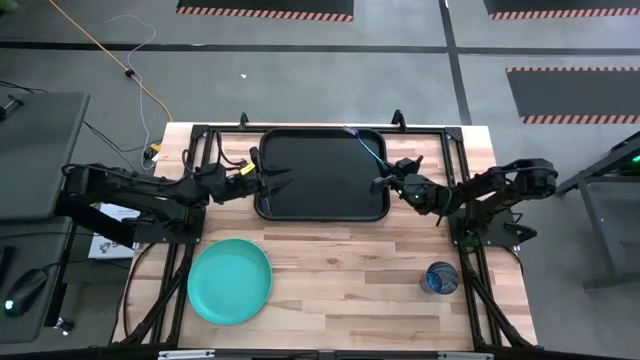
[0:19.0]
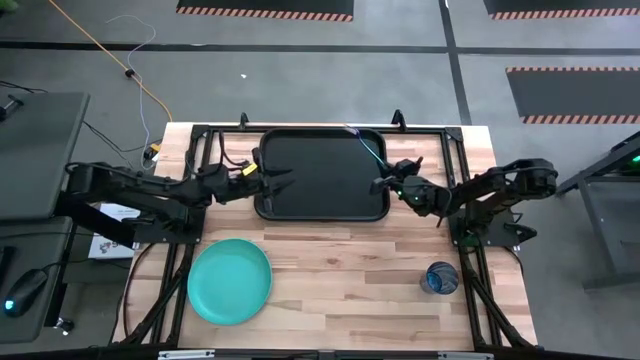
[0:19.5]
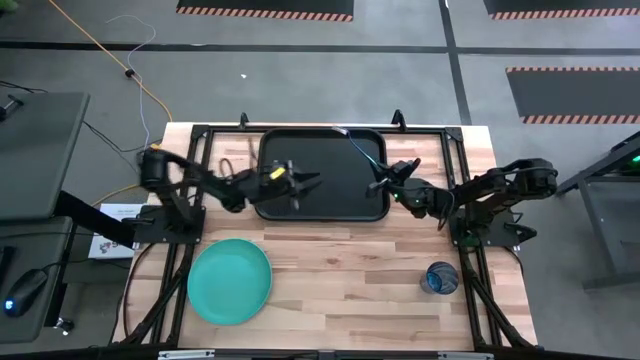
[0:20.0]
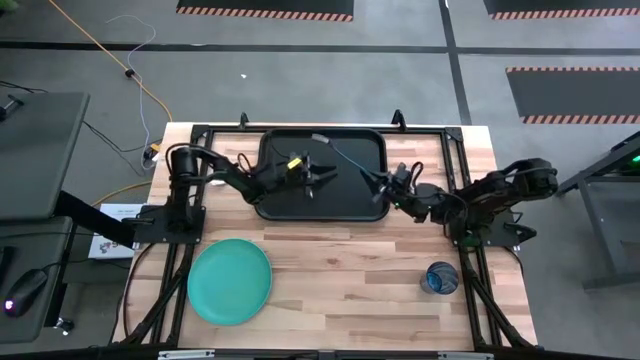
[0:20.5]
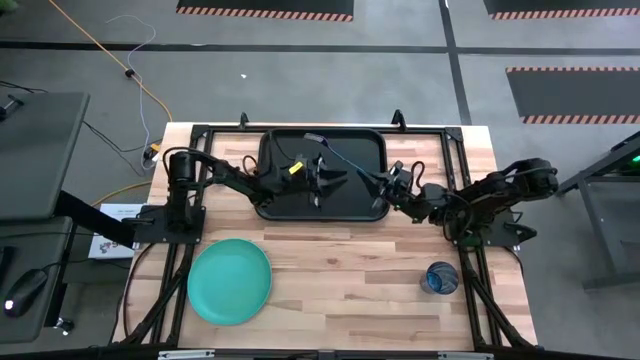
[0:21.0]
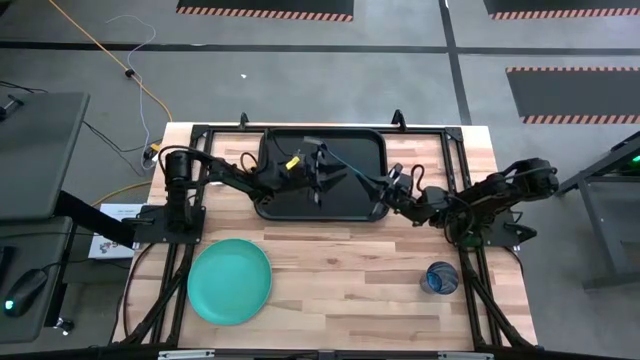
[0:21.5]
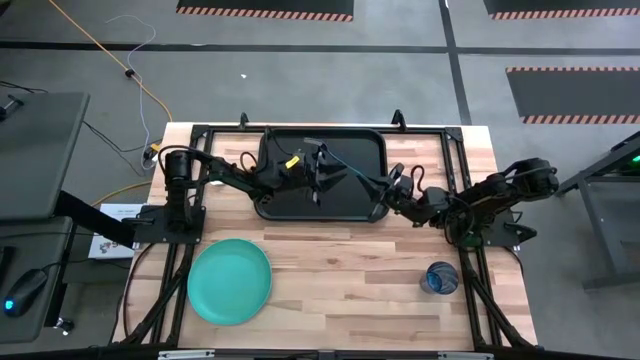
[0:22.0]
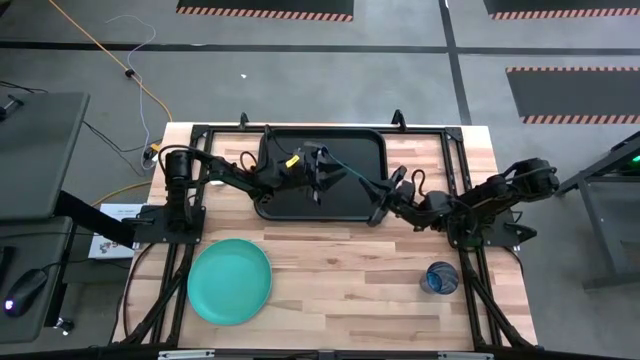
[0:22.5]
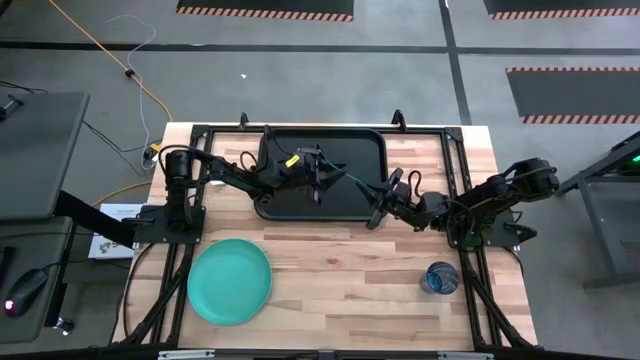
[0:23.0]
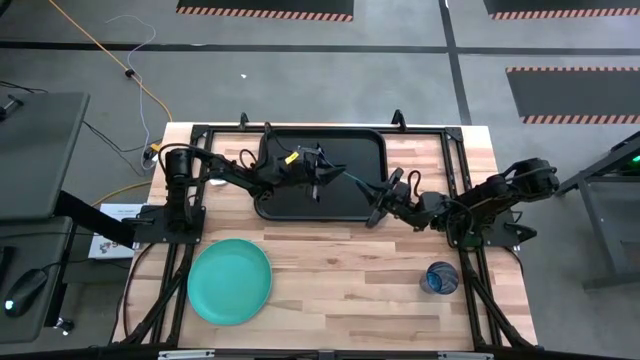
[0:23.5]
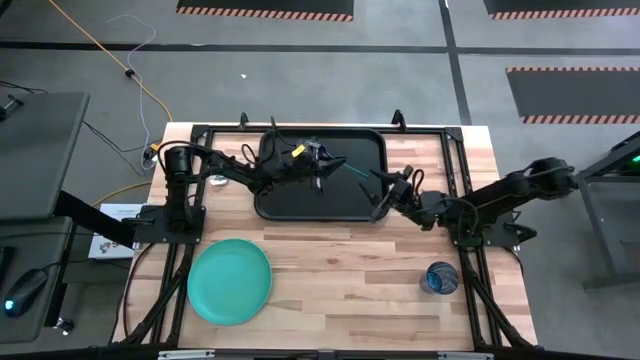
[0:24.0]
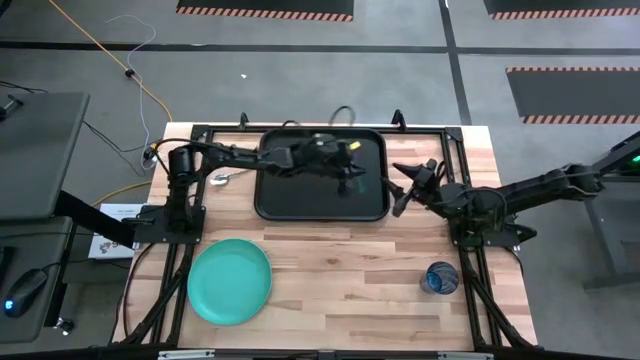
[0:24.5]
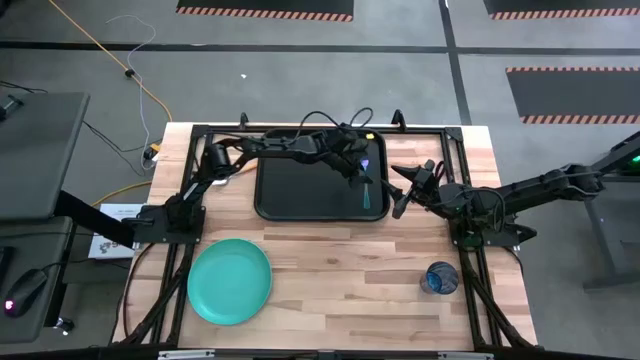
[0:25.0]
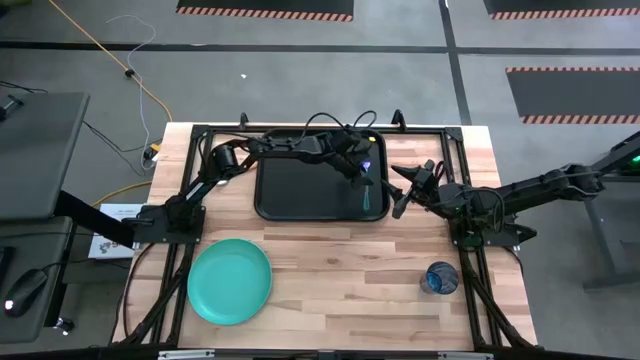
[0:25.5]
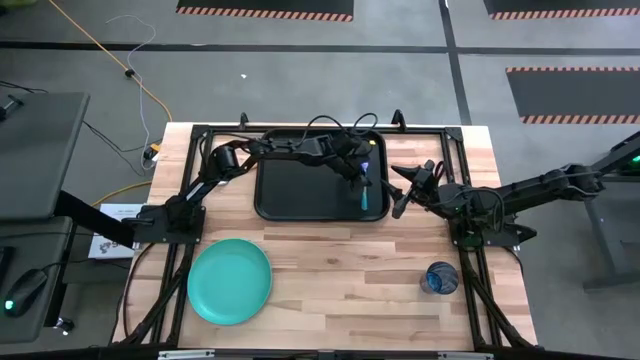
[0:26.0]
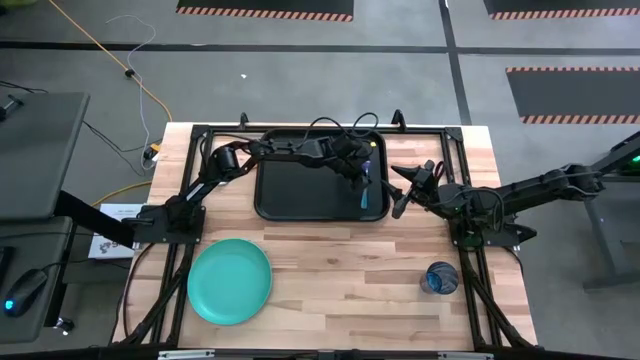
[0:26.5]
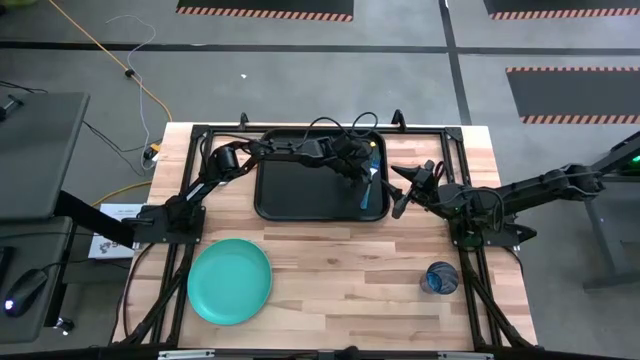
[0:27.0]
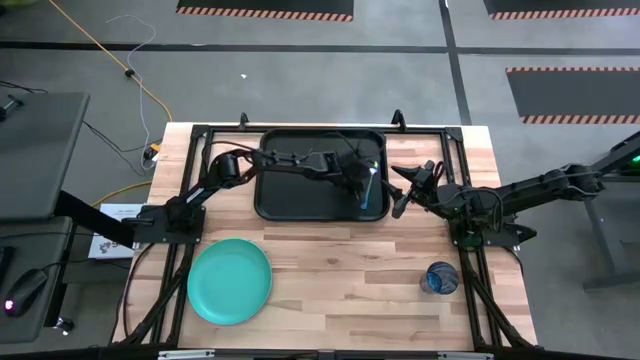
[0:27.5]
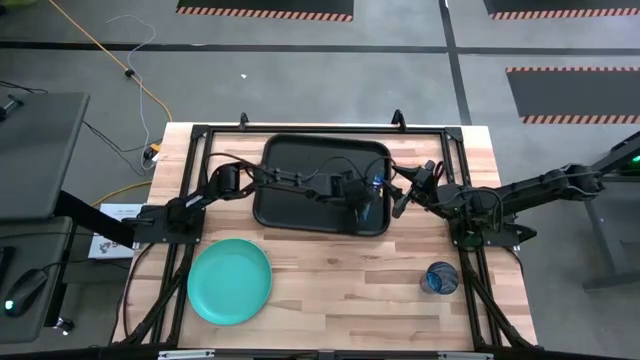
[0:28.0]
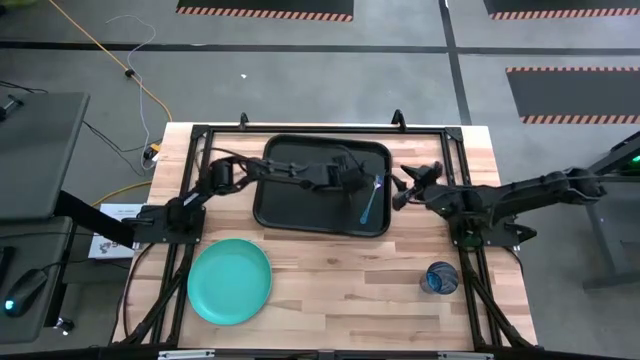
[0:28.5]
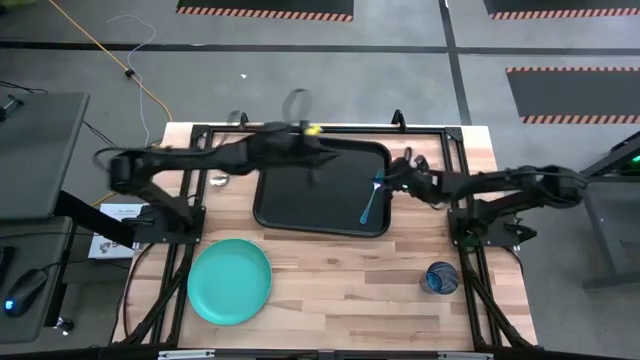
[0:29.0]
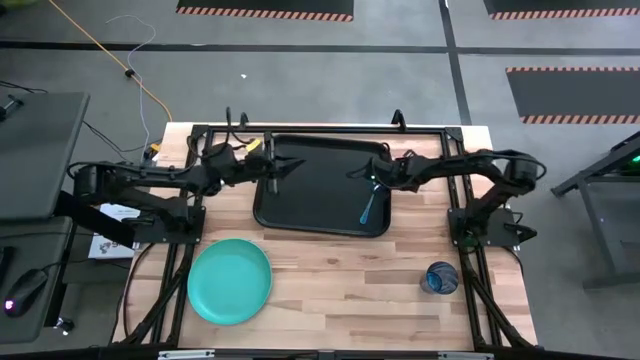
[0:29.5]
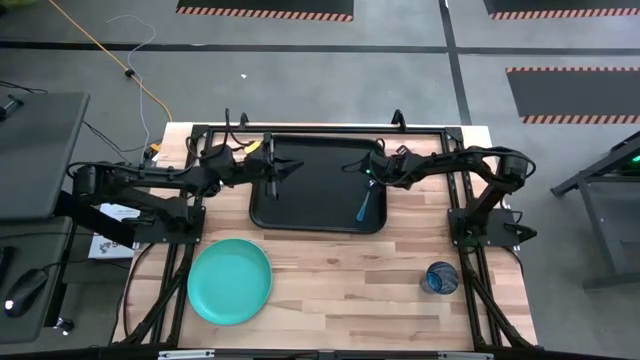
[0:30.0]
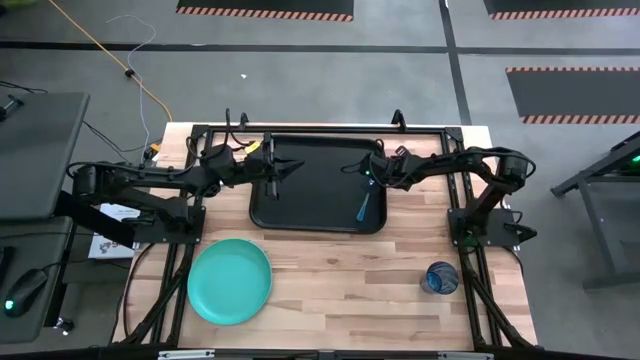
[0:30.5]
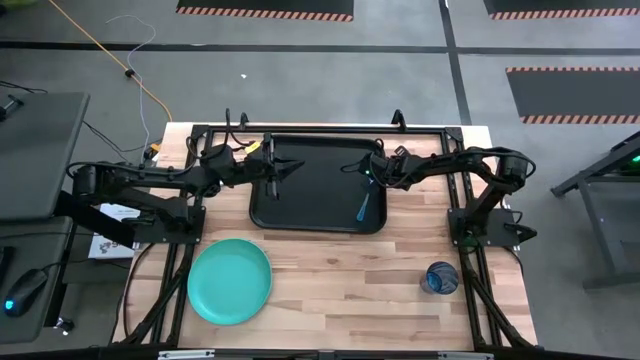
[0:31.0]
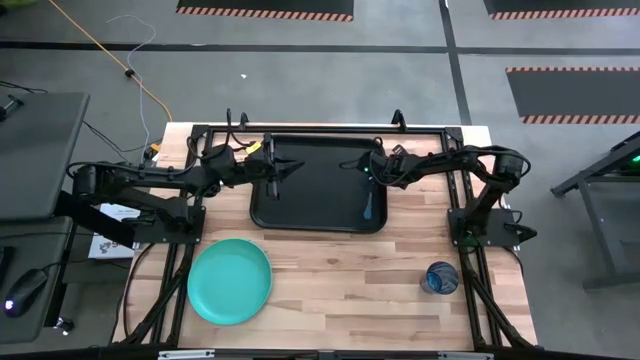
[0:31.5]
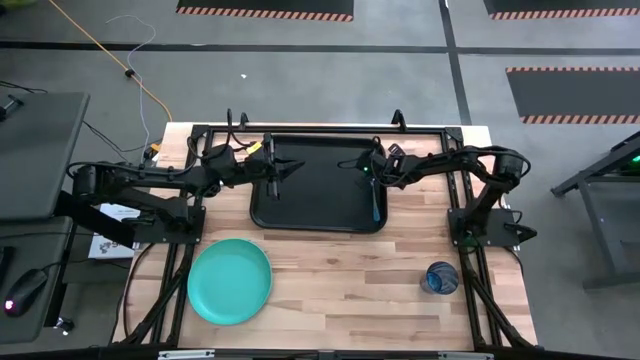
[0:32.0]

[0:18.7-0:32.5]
Task: Pick and place plate/cup/fork/spoon on tray
Put the blue fork on the black tray
